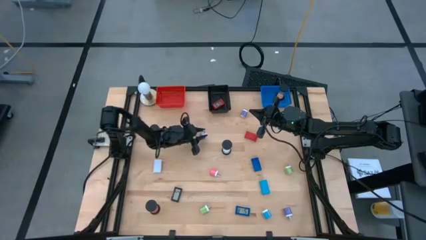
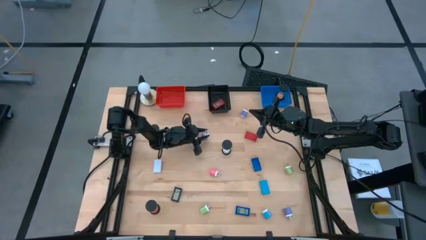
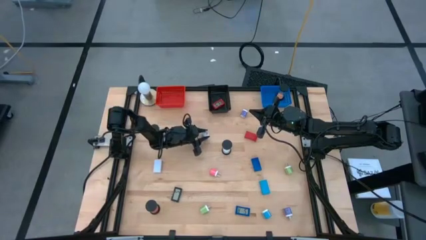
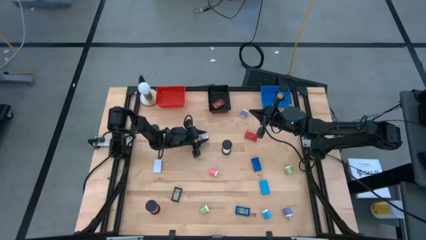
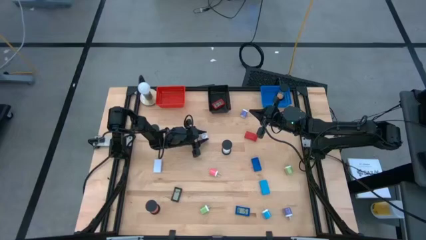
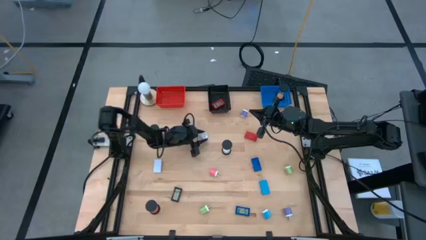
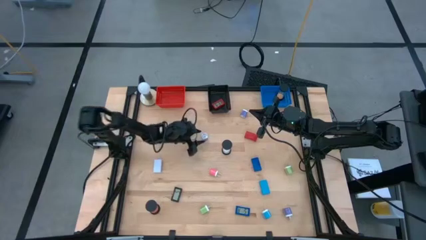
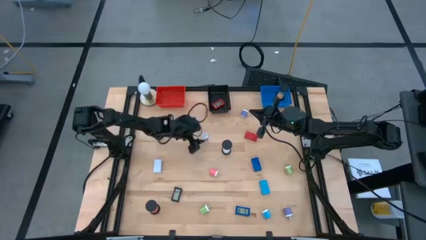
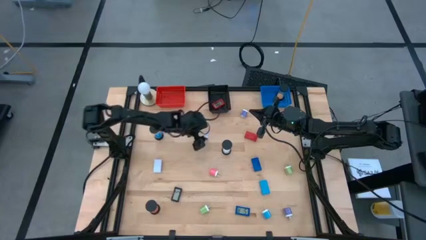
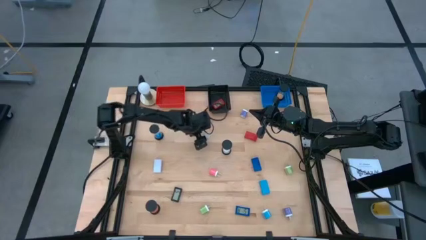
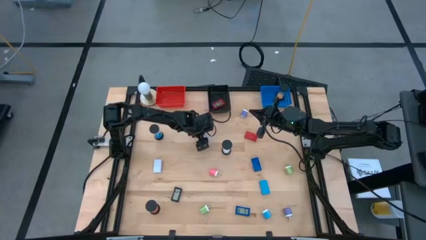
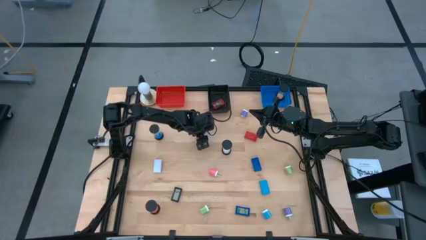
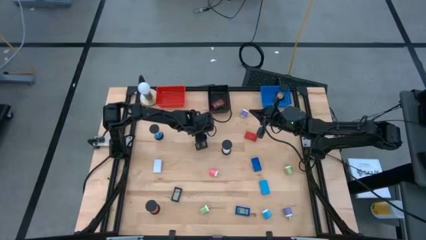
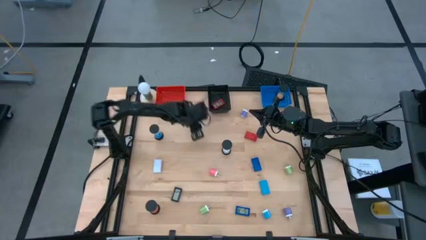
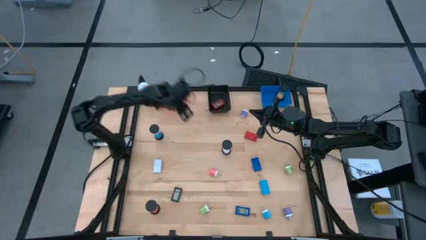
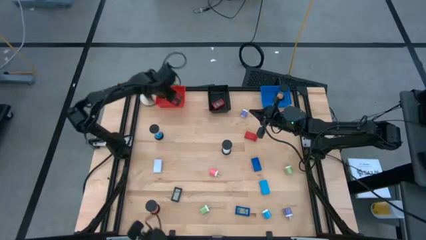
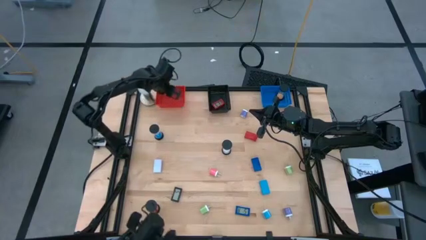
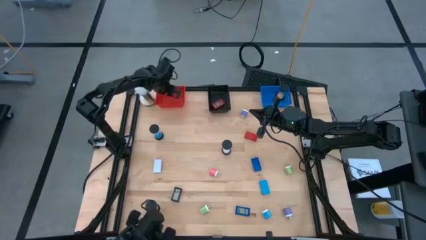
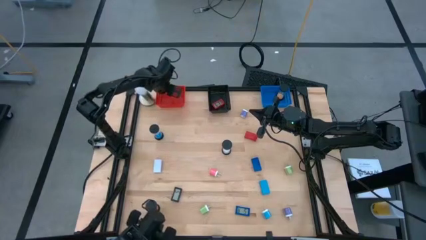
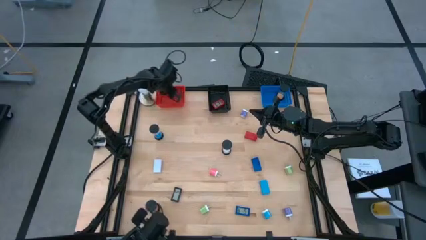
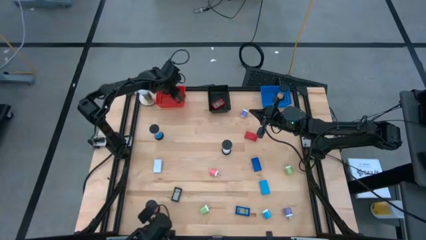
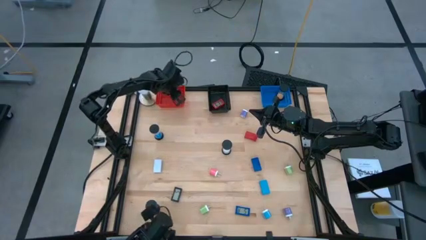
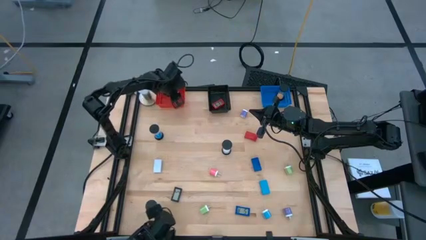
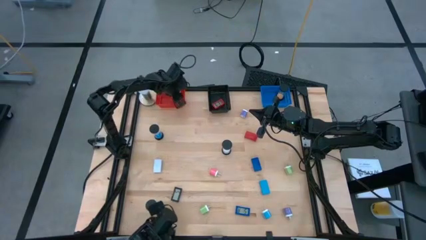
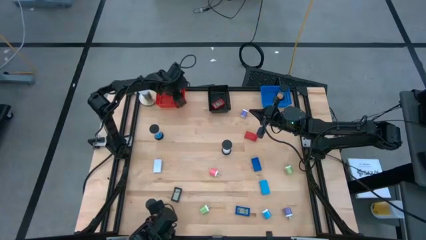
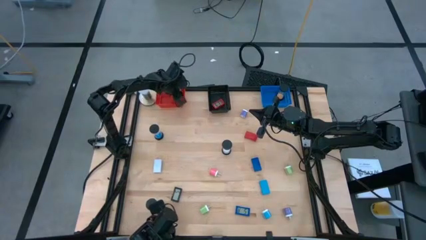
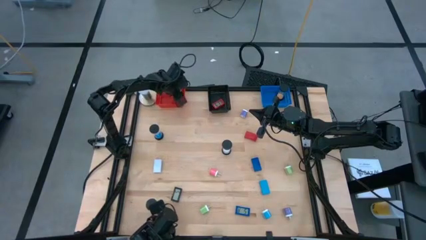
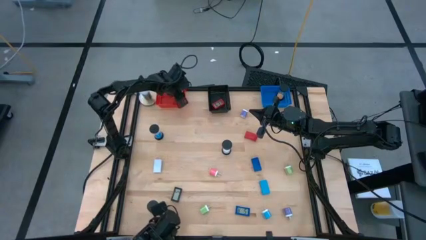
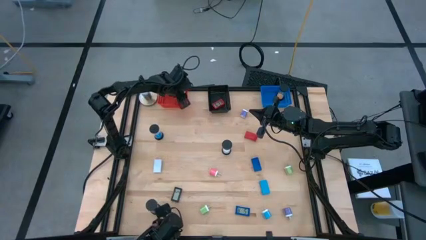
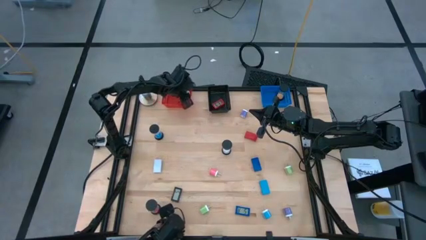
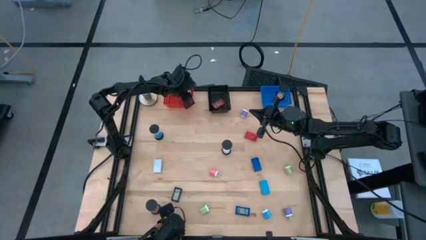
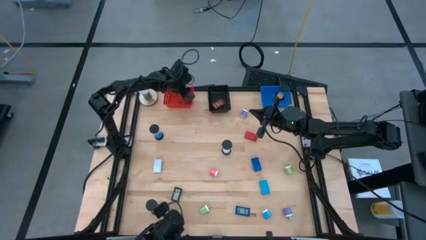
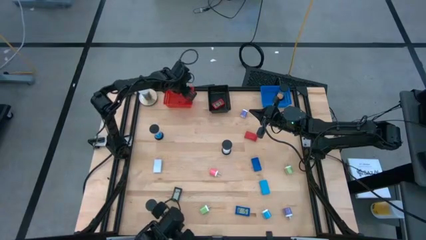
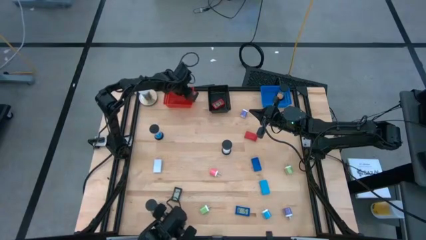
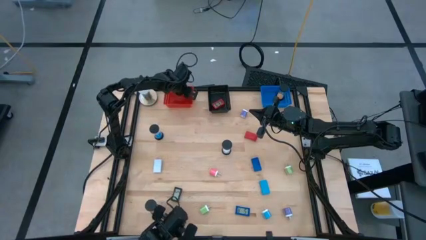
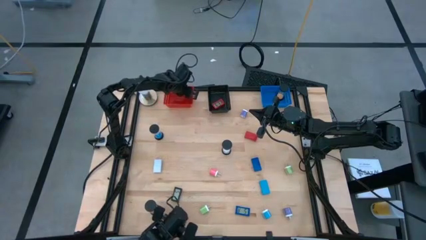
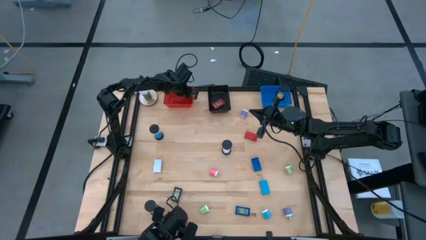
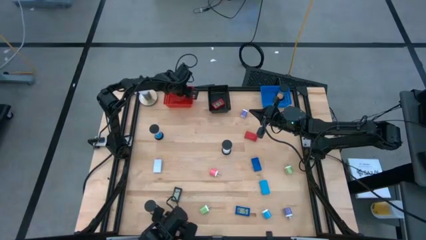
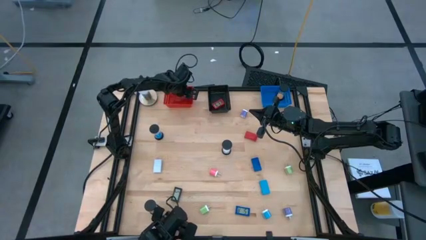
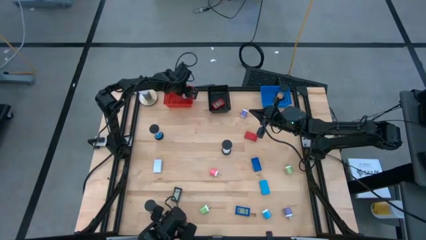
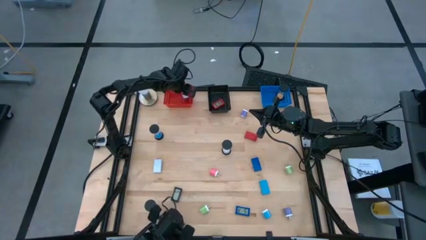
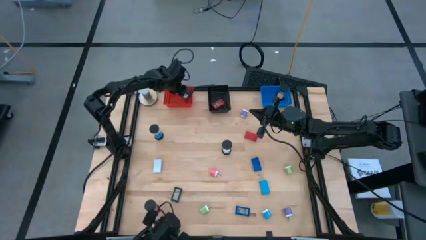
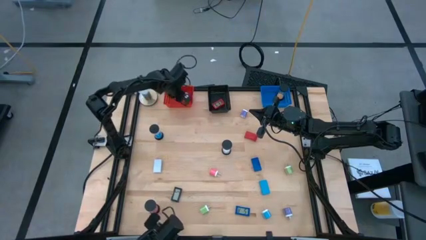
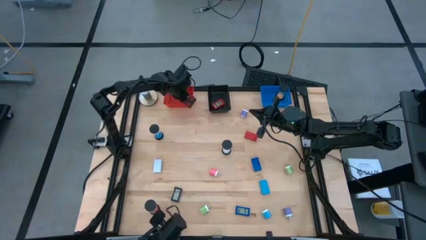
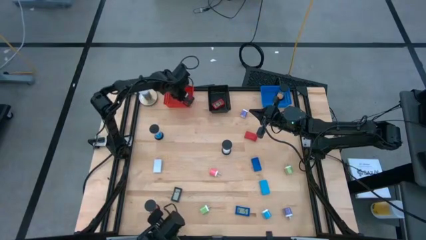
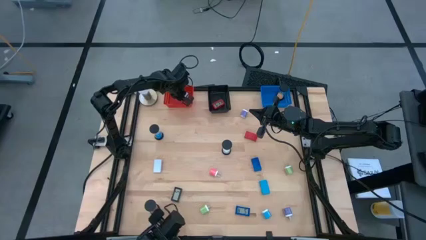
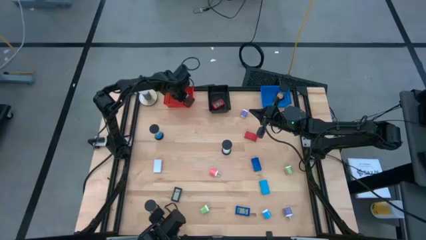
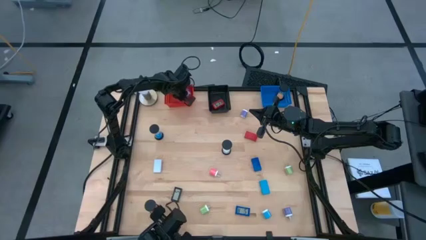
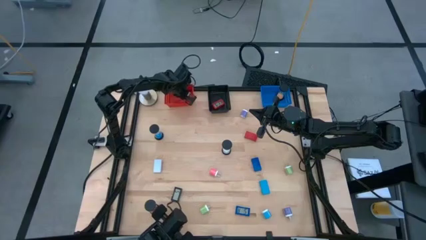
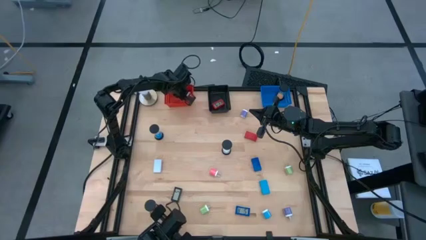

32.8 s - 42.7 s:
Task: Pick & Place Office items
Put the middle left purple charger adapter into the red bin

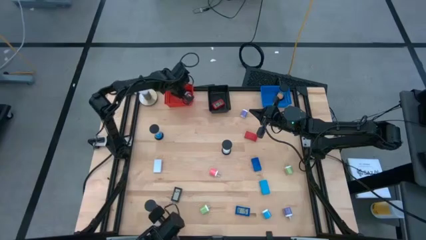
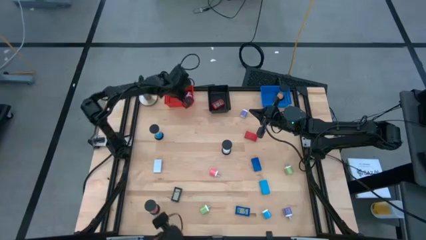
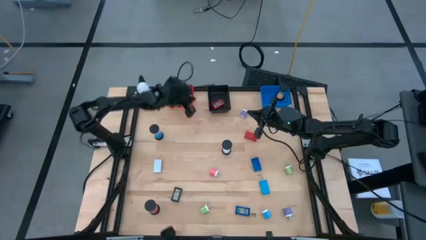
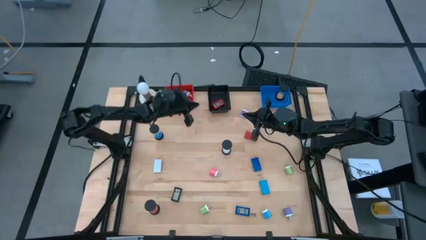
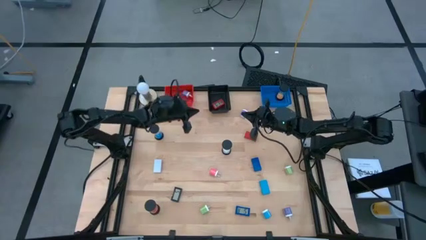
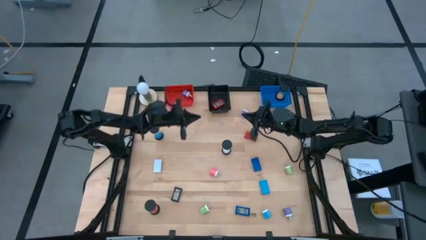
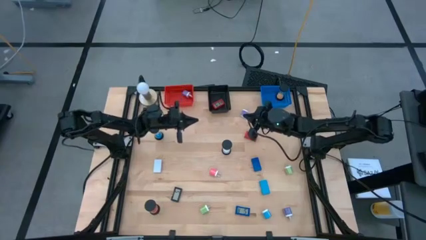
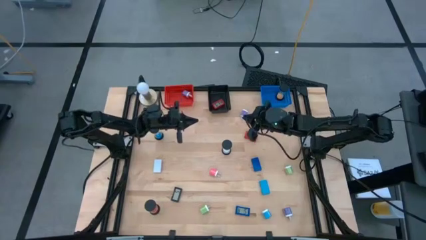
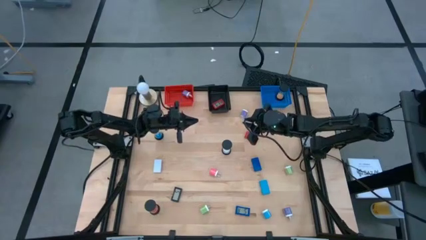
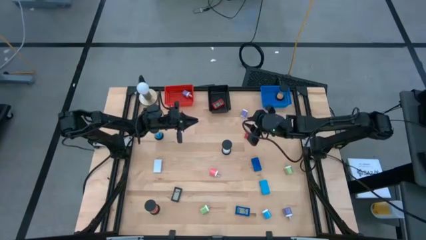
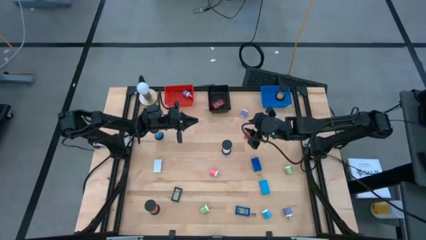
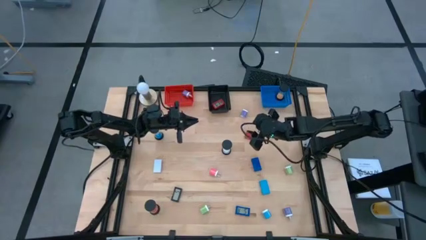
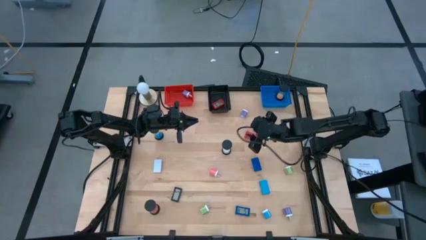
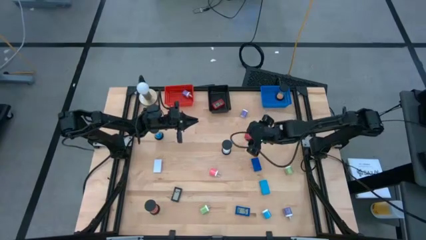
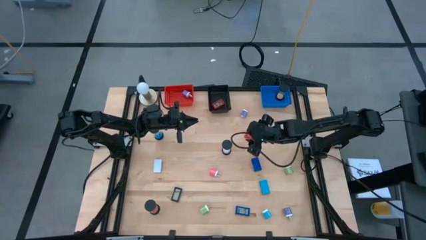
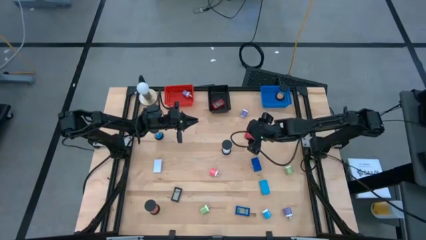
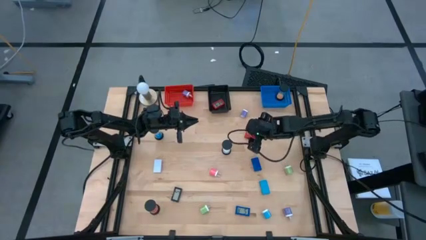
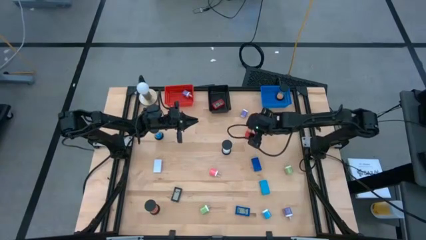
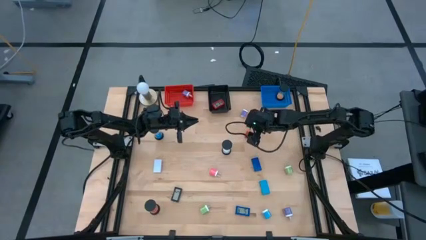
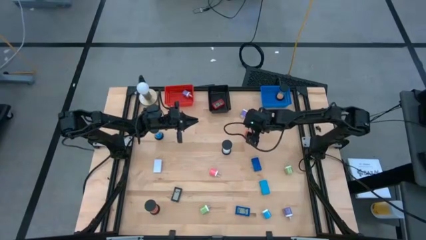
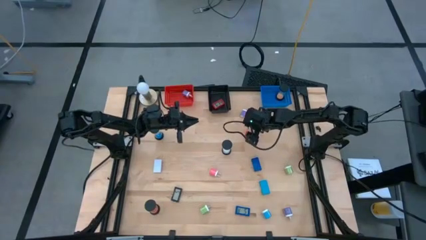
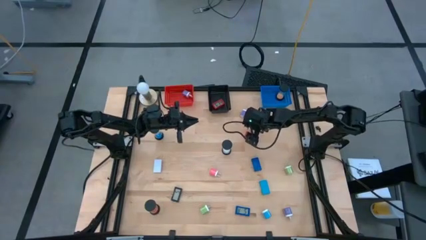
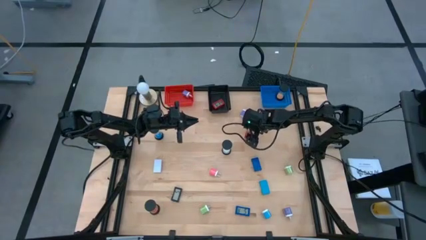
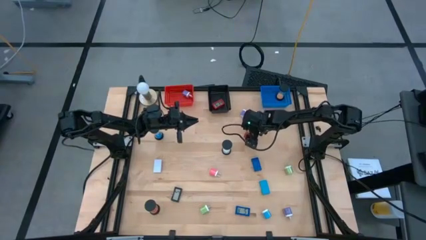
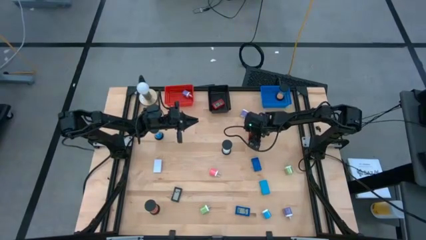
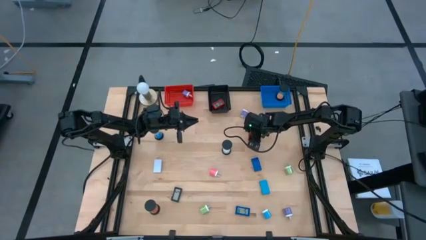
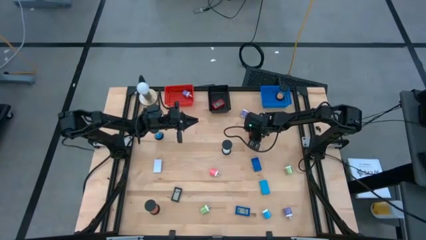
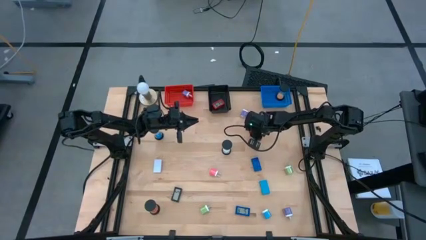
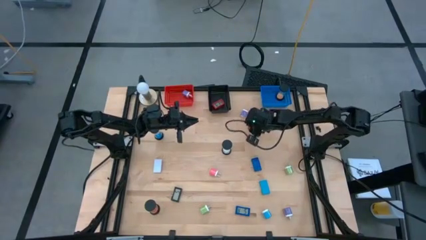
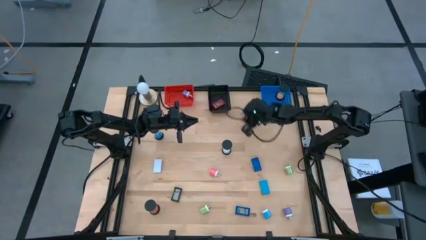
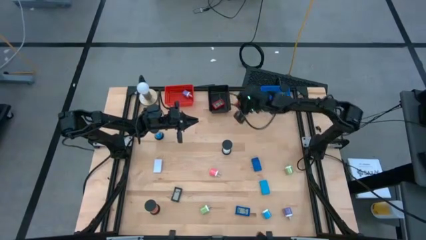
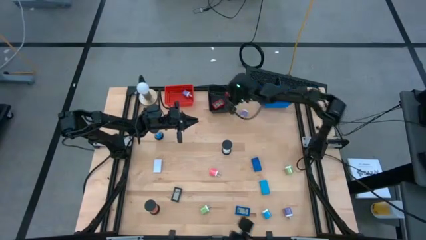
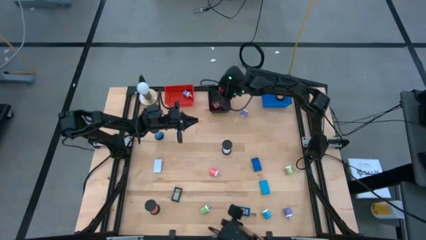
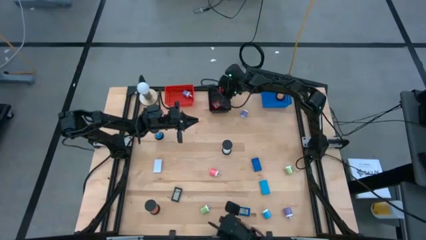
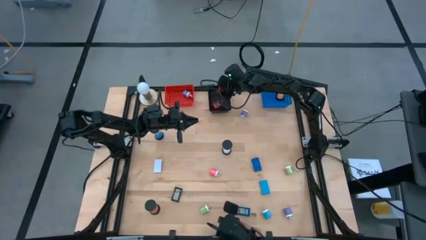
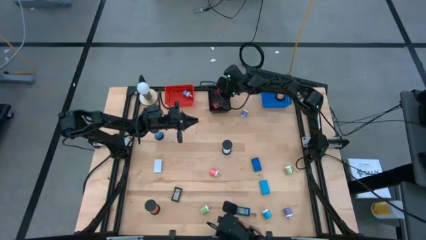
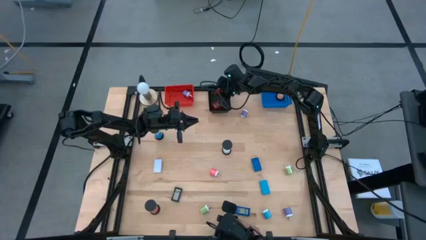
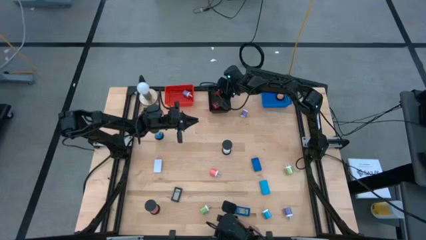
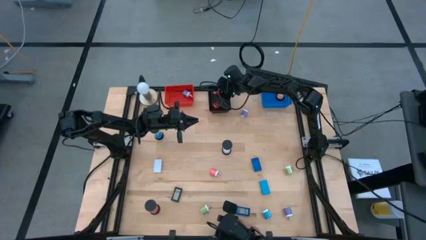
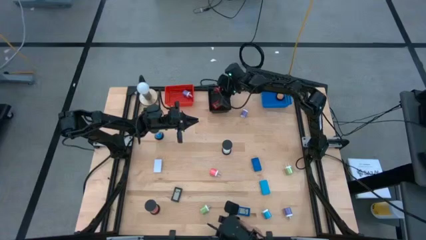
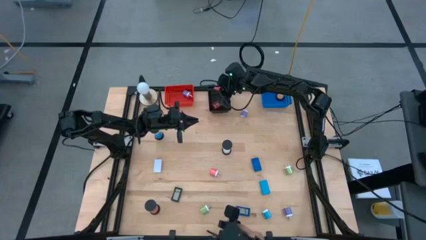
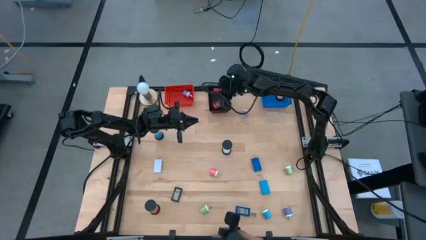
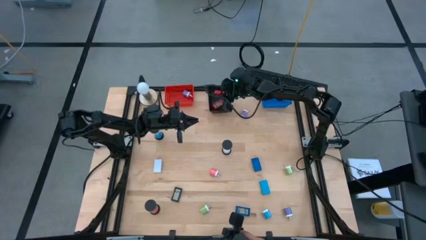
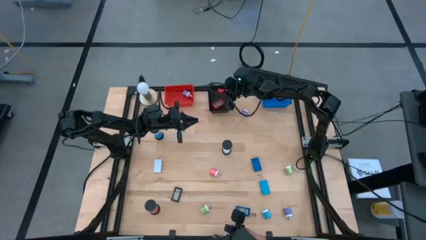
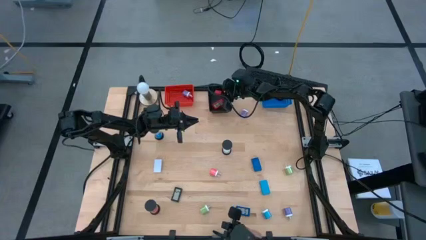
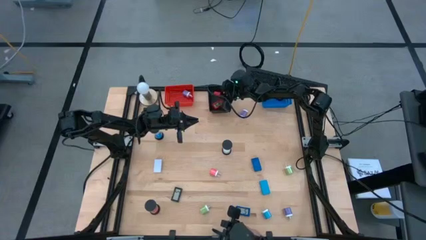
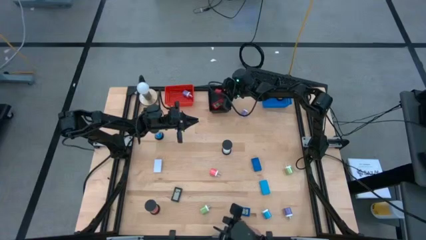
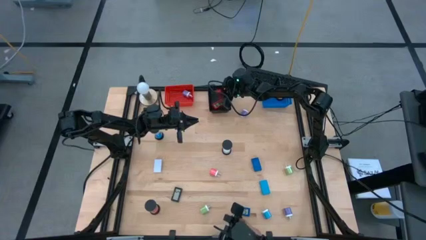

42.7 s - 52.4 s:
Put the red digital timer into the black bin
